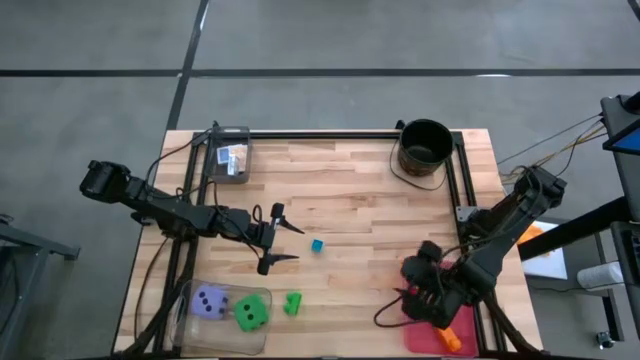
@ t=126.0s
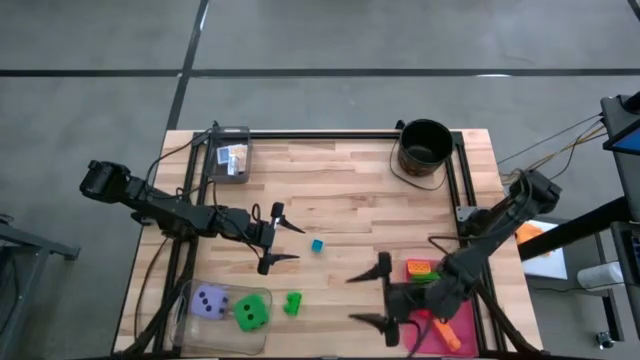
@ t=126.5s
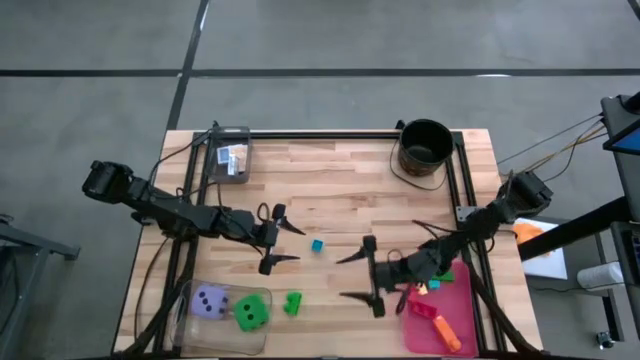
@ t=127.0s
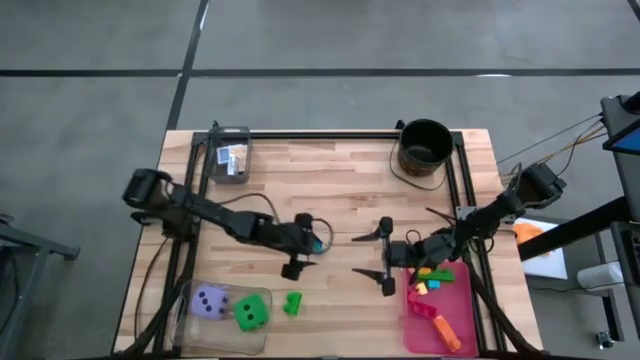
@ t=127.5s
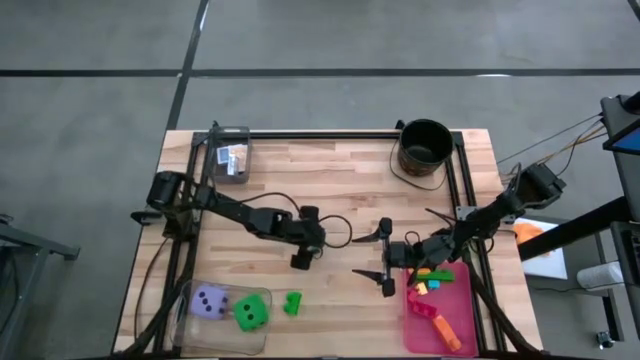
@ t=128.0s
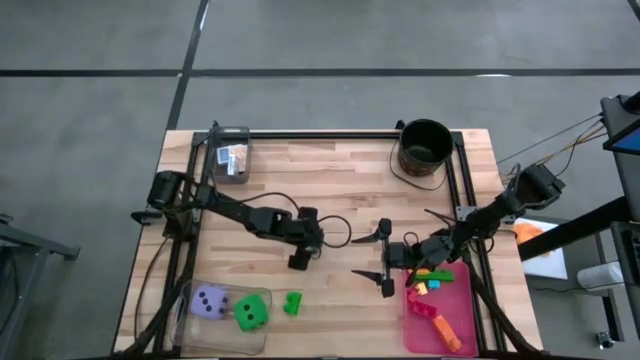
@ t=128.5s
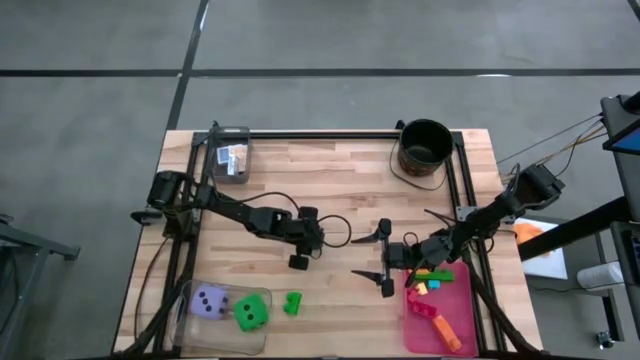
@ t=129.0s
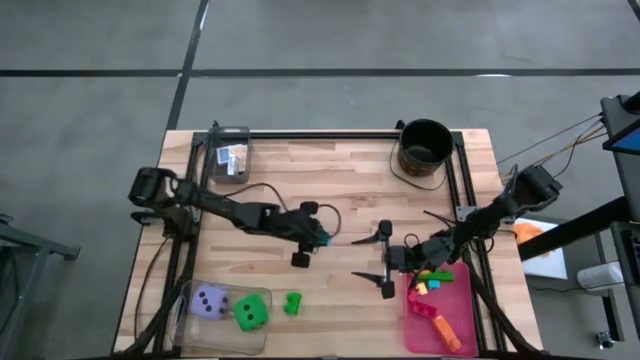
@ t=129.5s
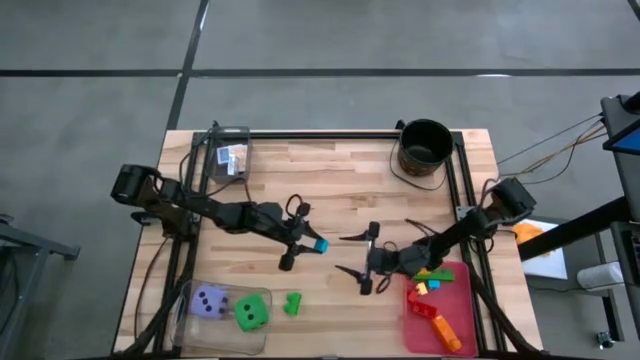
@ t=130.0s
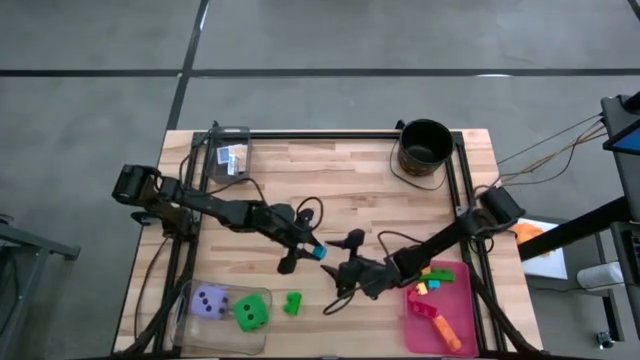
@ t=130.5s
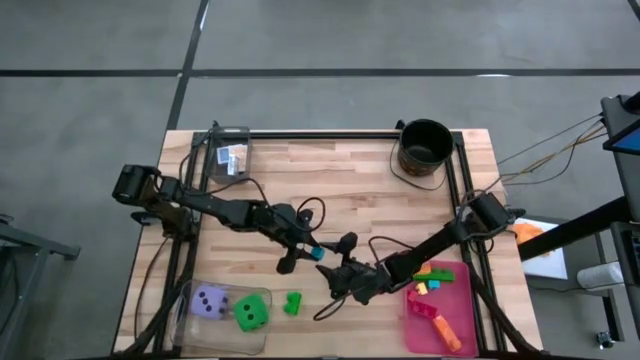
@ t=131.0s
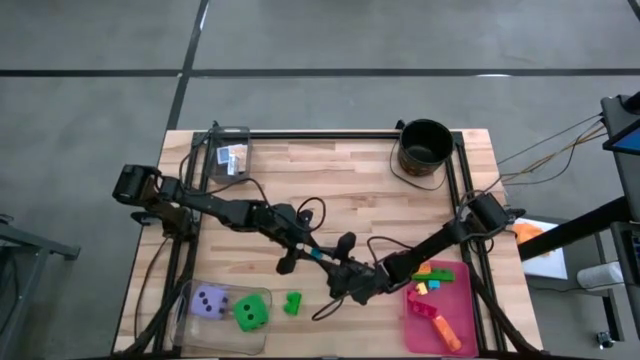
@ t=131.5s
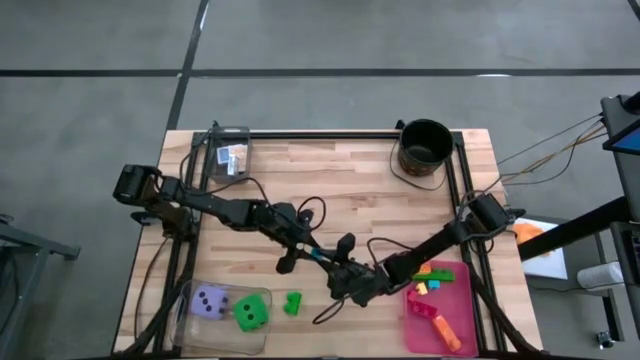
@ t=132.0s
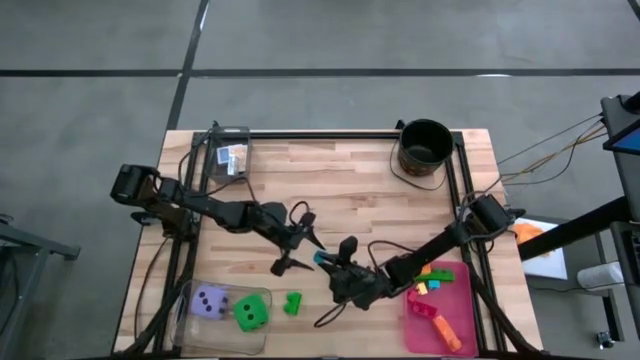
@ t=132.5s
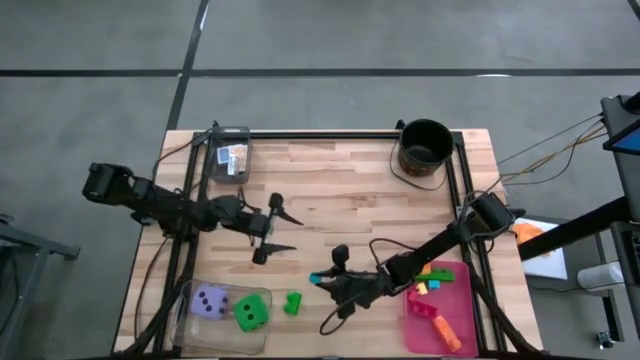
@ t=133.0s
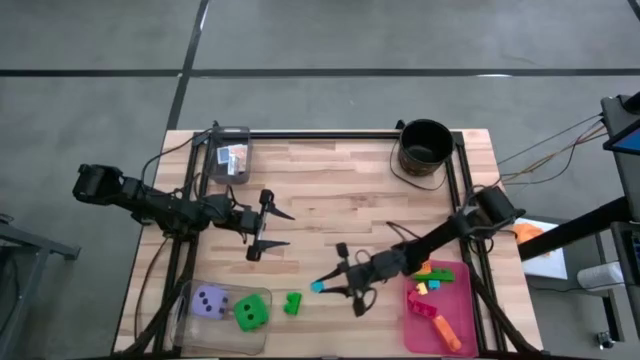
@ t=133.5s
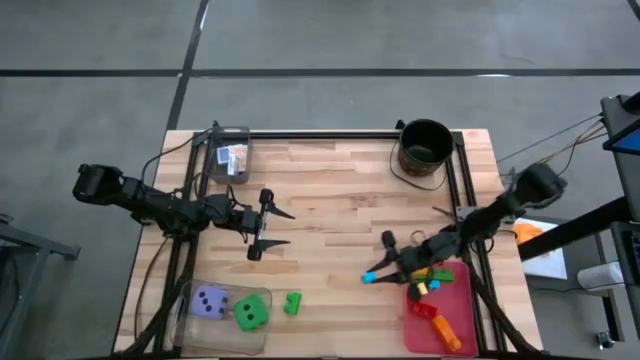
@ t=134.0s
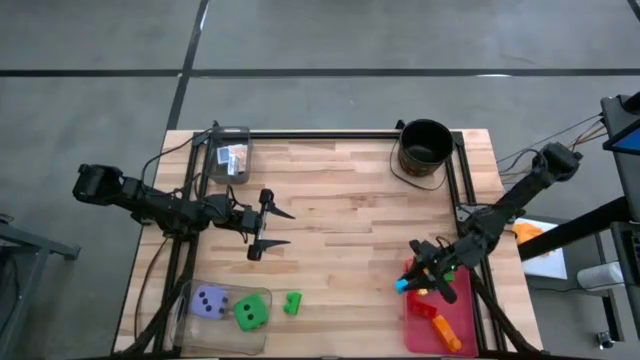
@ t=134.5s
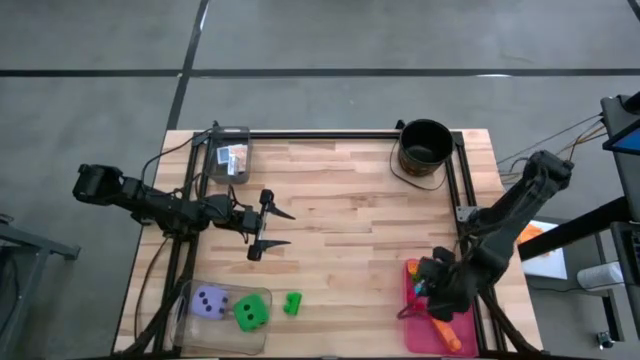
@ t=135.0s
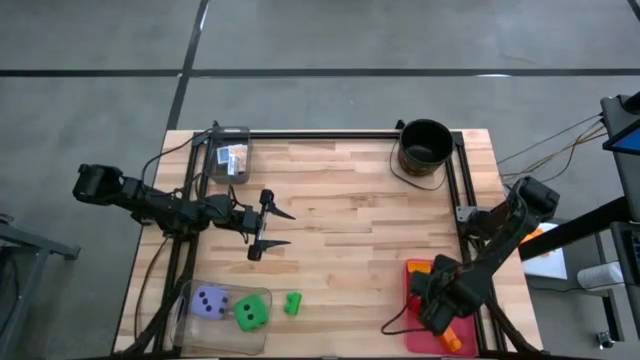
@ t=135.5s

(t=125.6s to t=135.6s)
Task: Pick & Place Toys
Put the light blue game piece into the pink bin

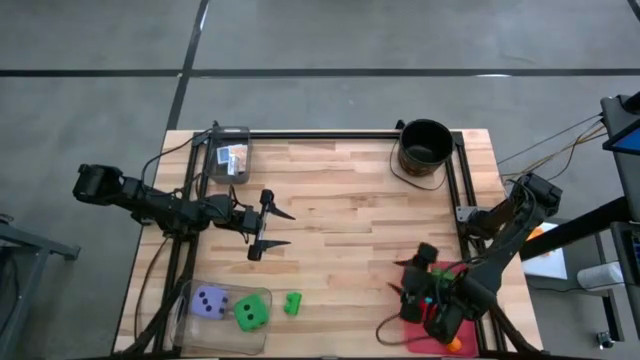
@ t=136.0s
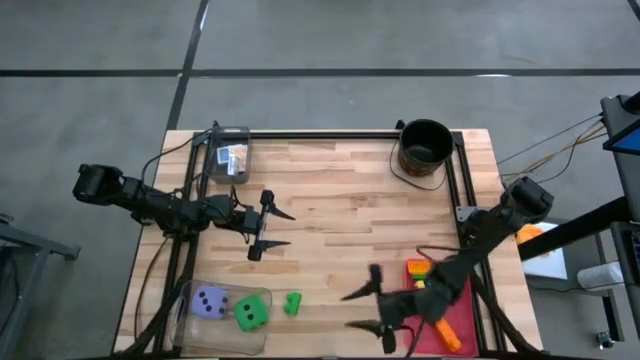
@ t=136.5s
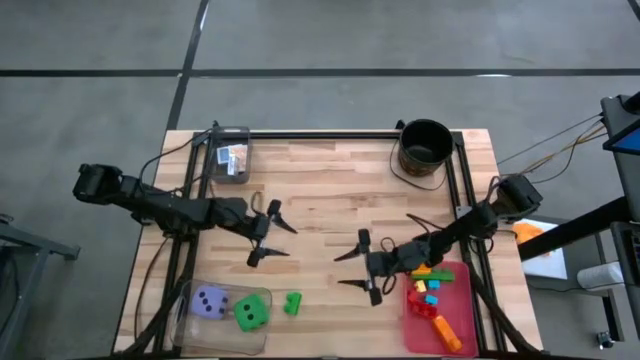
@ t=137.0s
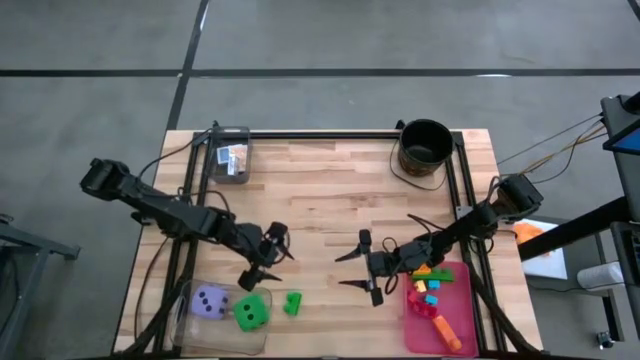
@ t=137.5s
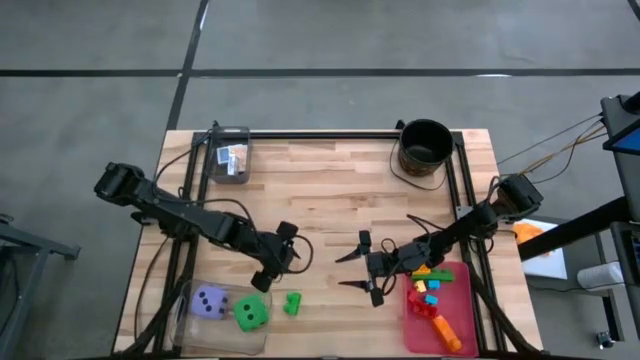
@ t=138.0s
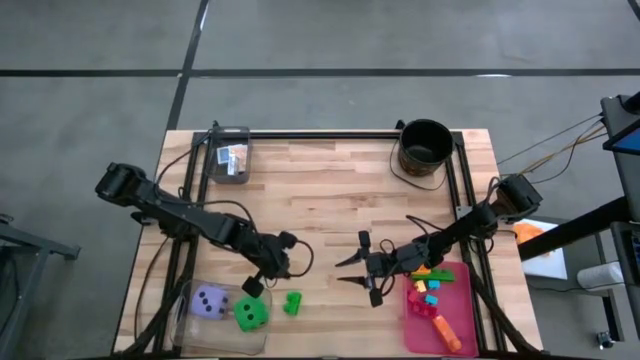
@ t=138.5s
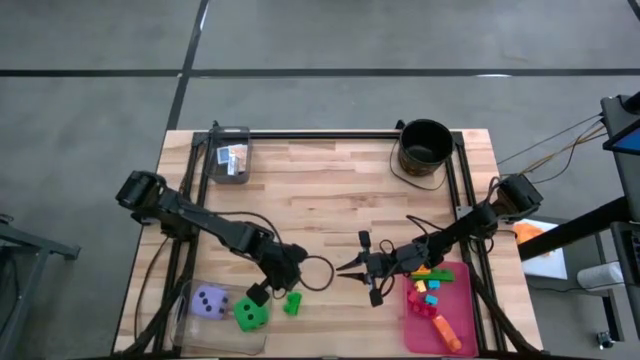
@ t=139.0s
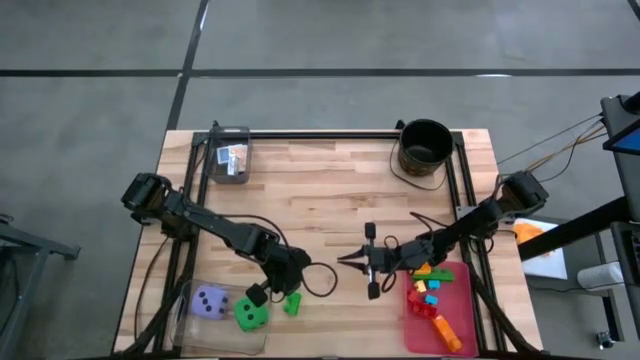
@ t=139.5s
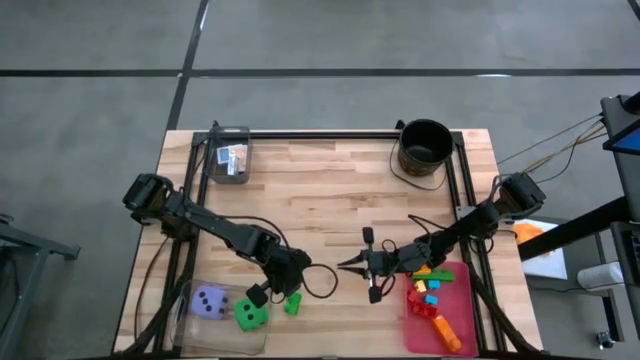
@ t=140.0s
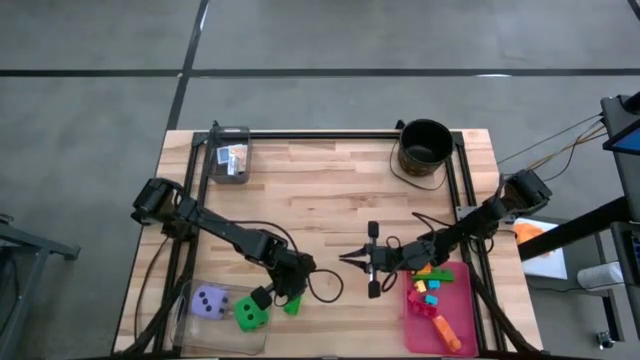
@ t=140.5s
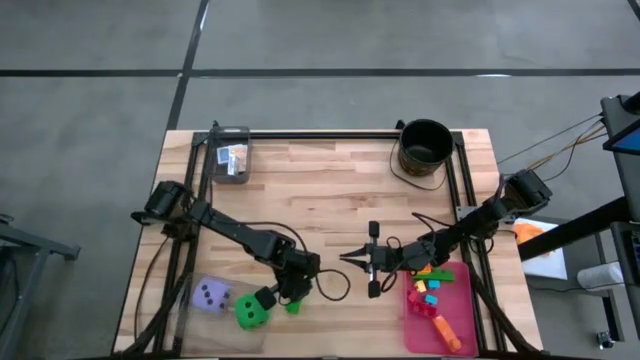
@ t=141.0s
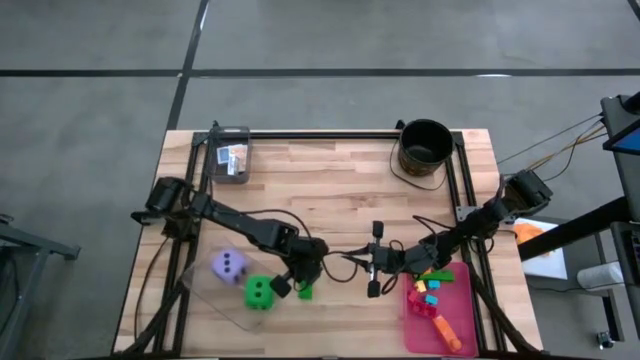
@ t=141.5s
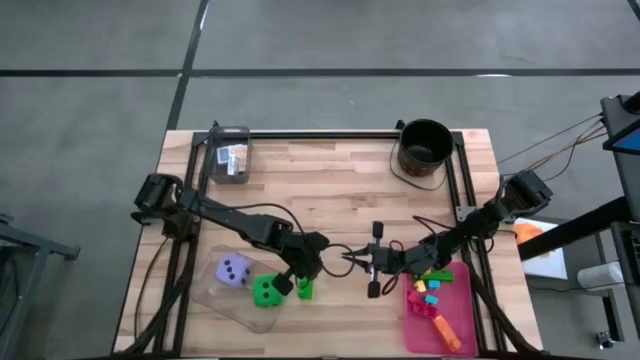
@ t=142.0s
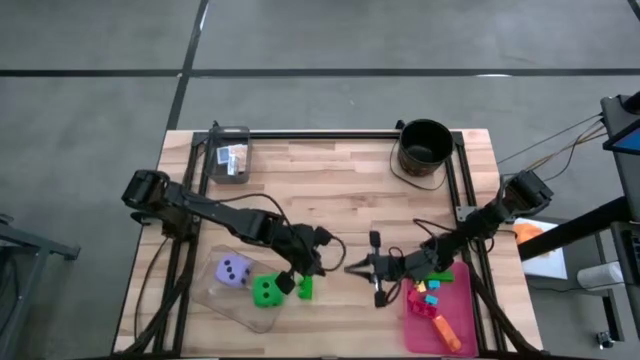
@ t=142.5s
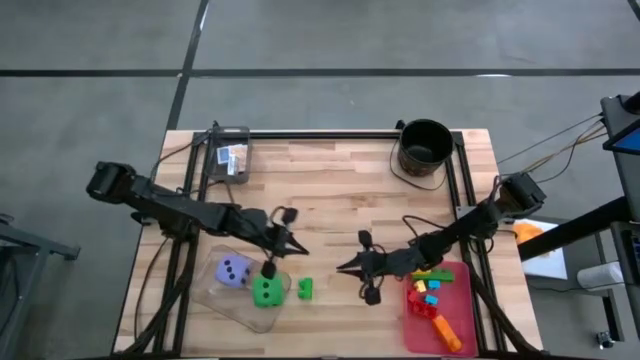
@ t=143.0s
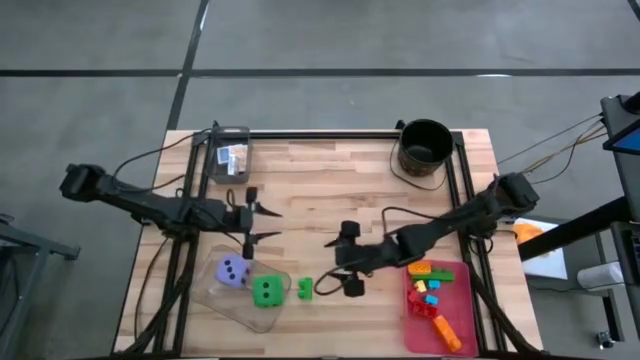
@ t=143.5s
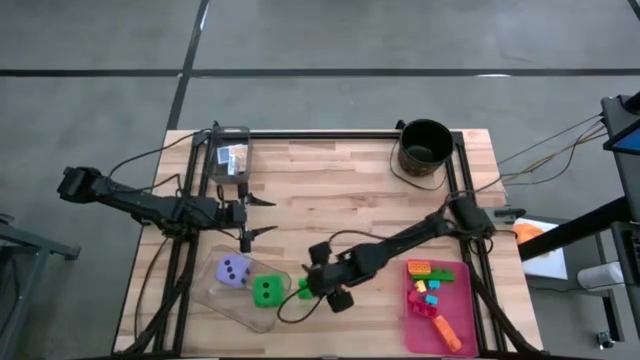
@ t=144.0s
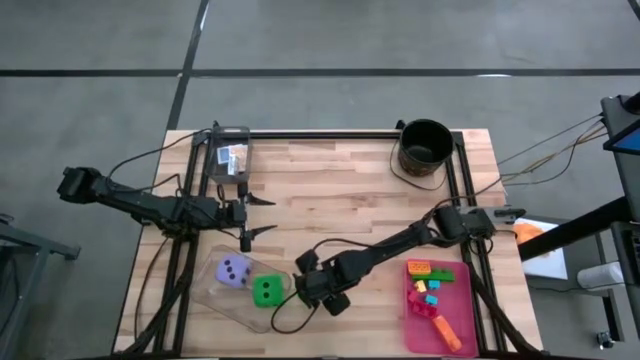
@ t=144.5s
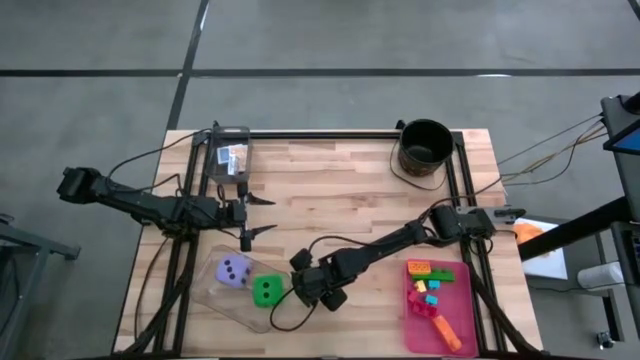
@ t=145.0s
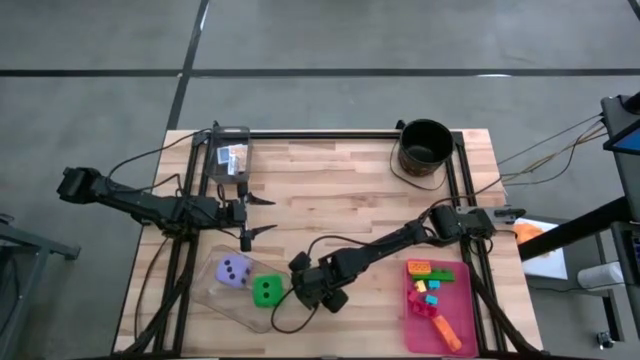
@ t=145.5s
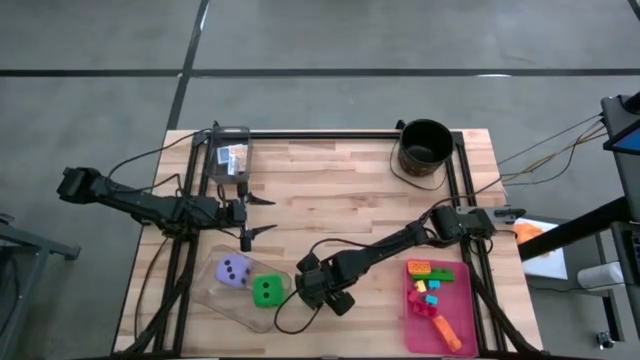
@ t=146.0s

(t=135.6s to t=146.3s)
Put the green game piece into the pink bin

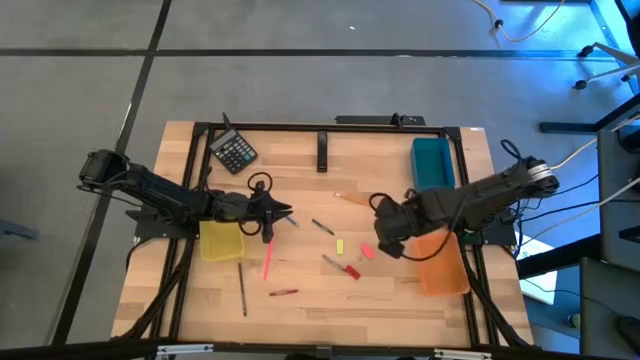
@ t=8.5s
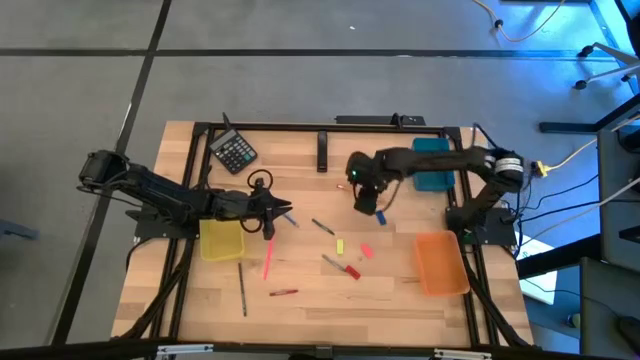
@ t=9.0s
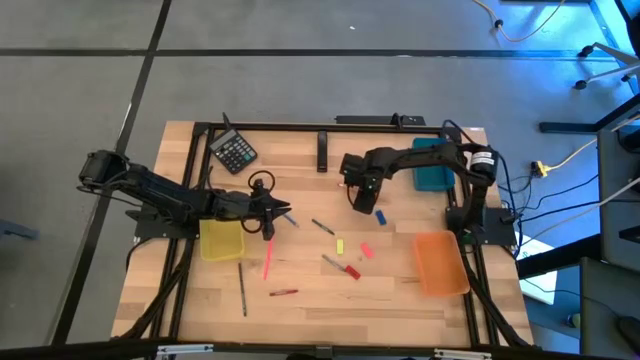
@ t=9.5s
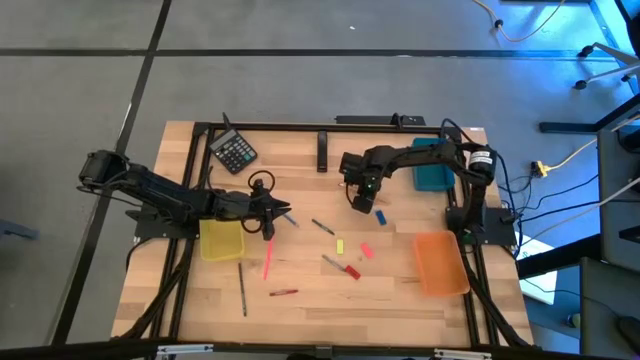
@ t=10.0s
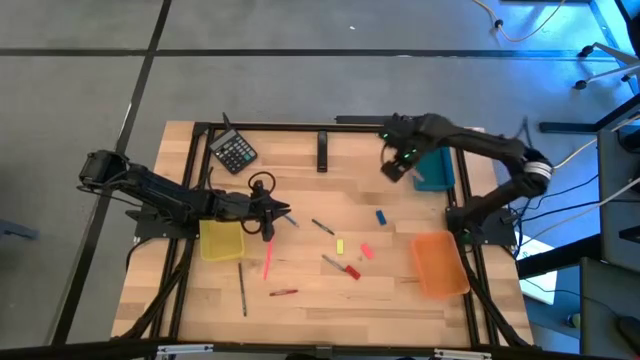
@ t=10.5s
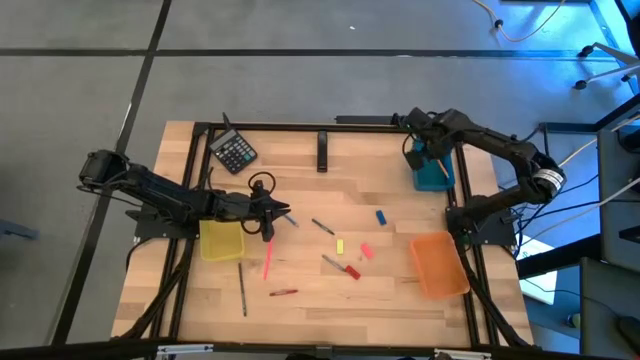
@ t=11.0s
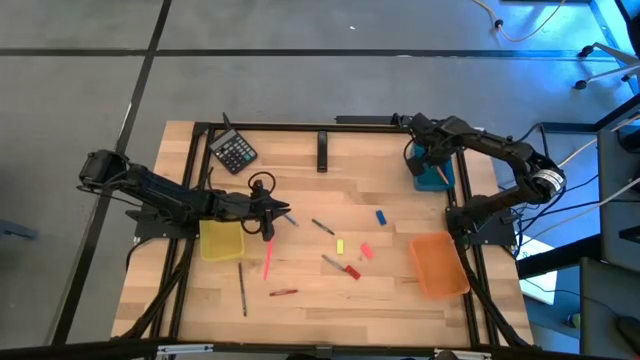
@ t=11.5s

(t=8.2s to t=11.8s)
Task: Sort crayons/erasers/pens/pencils in bins
Put the orange pencil into the blue bin
